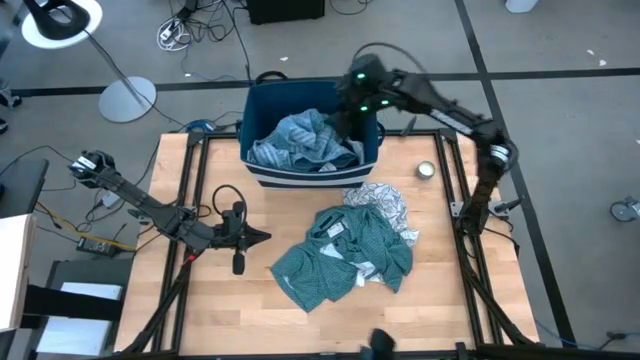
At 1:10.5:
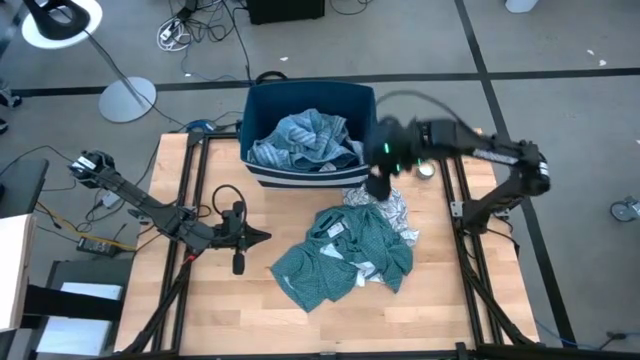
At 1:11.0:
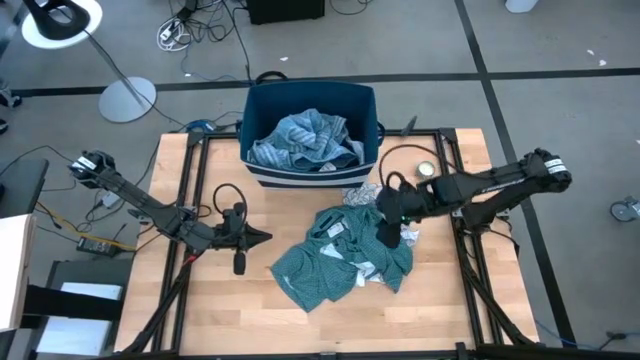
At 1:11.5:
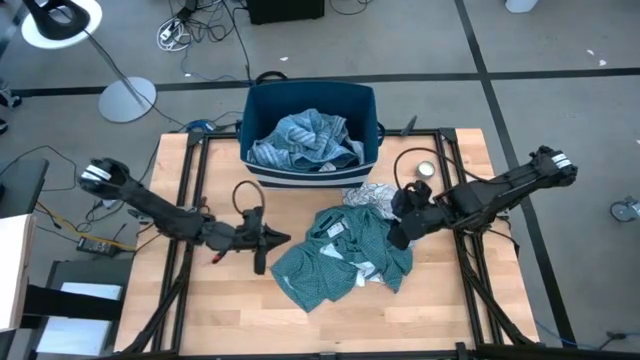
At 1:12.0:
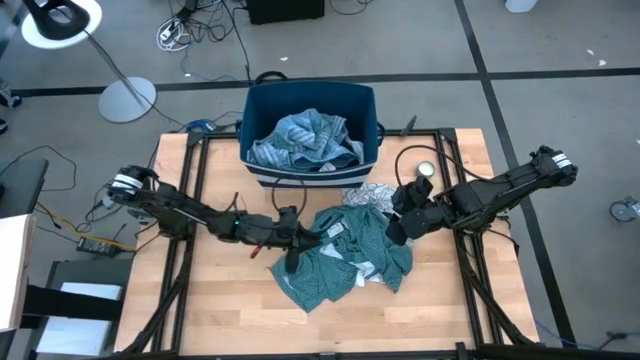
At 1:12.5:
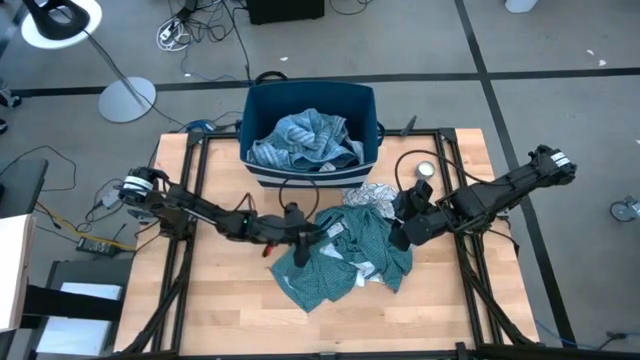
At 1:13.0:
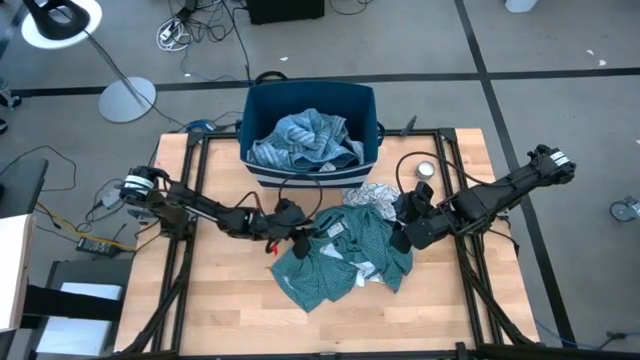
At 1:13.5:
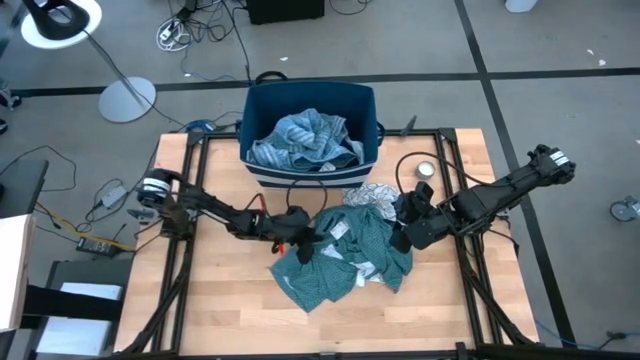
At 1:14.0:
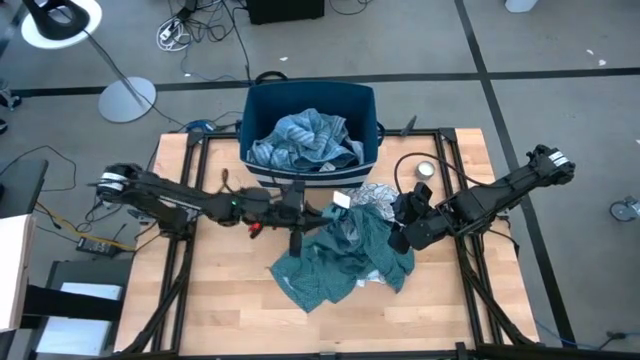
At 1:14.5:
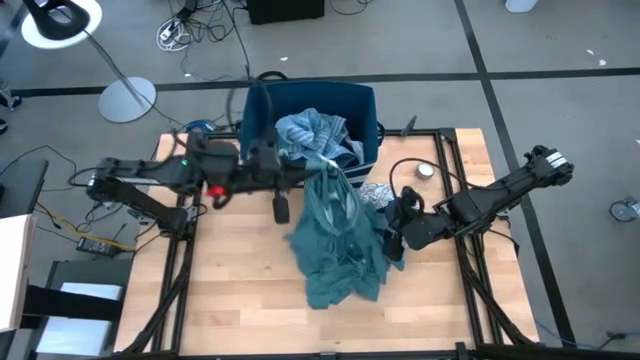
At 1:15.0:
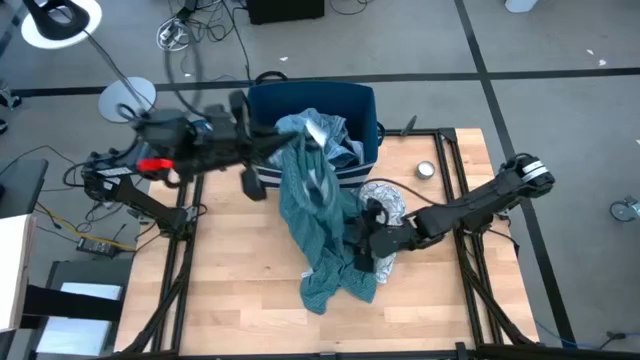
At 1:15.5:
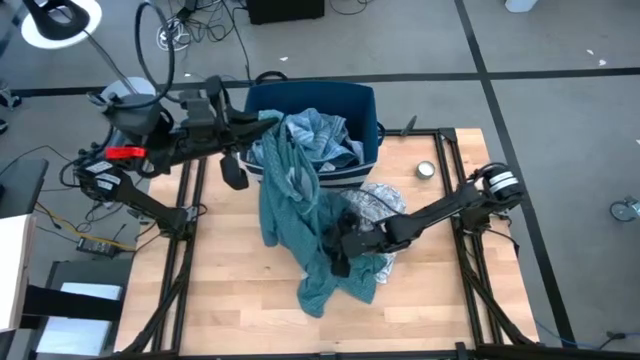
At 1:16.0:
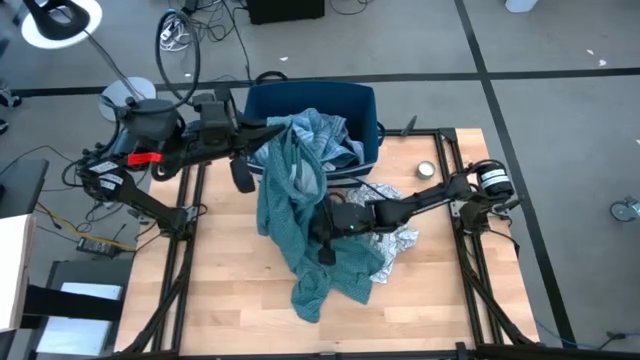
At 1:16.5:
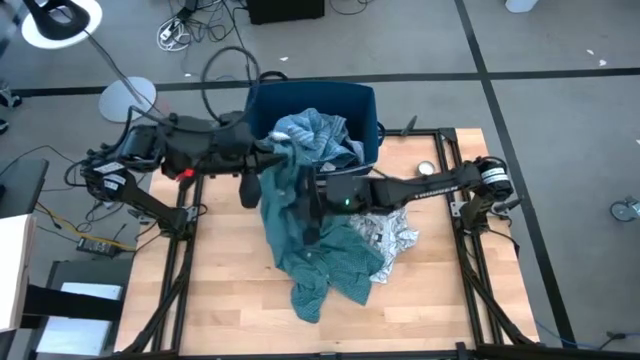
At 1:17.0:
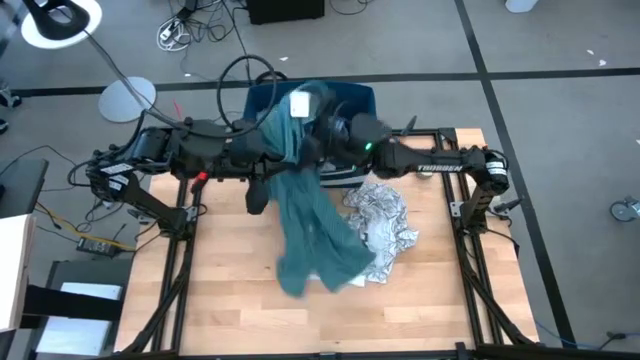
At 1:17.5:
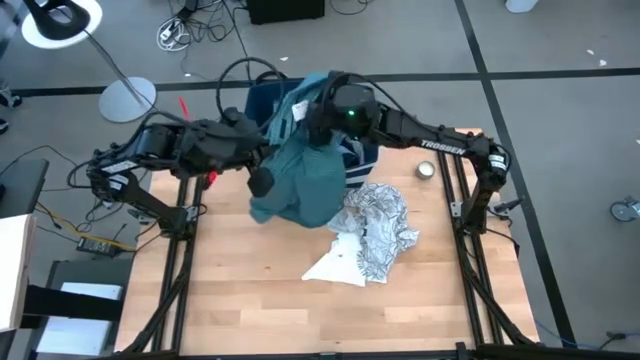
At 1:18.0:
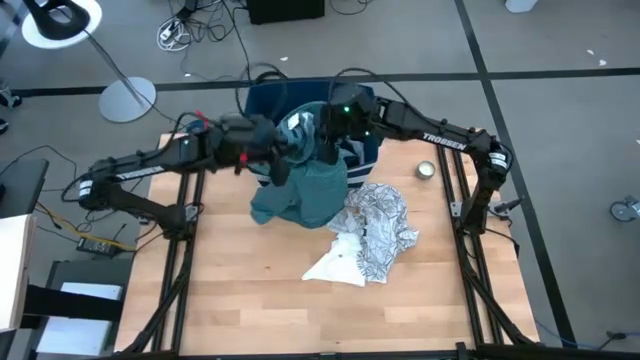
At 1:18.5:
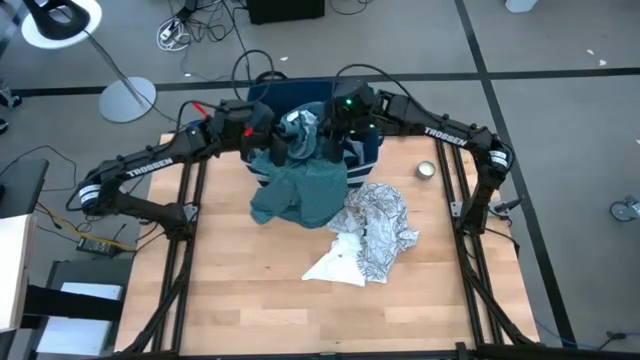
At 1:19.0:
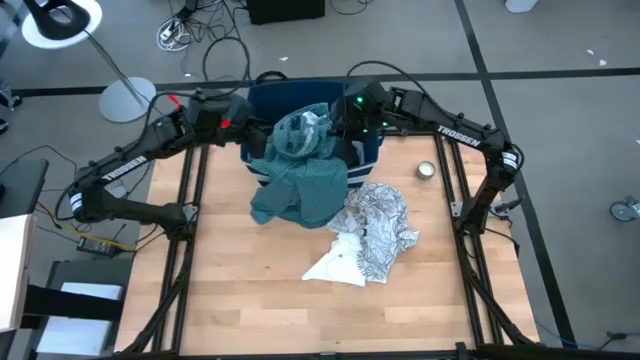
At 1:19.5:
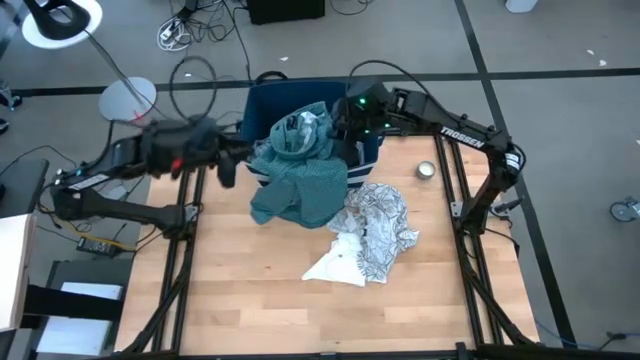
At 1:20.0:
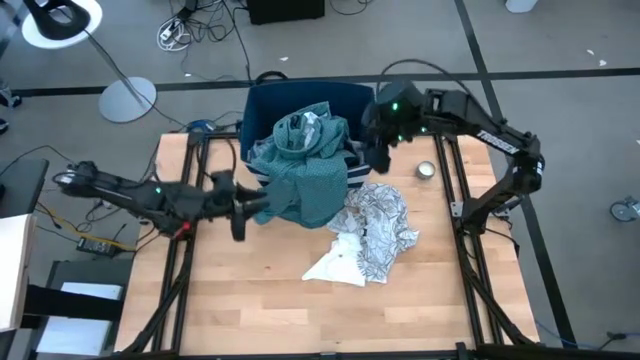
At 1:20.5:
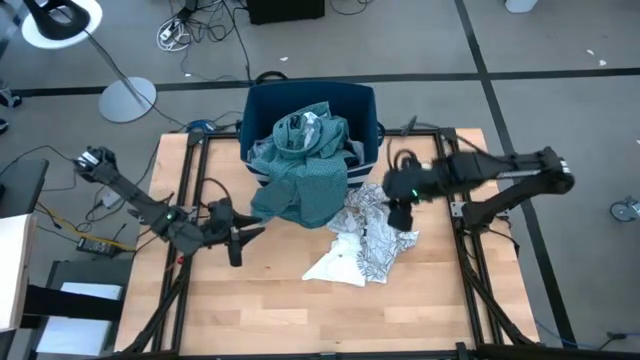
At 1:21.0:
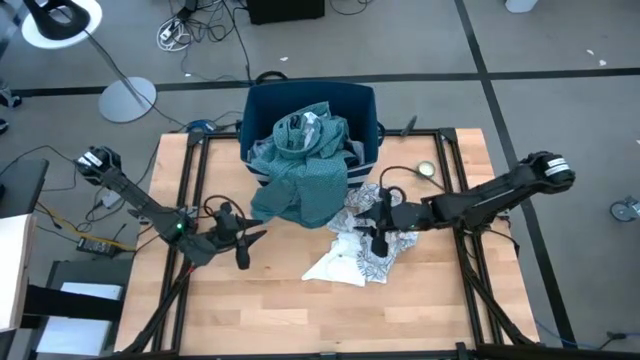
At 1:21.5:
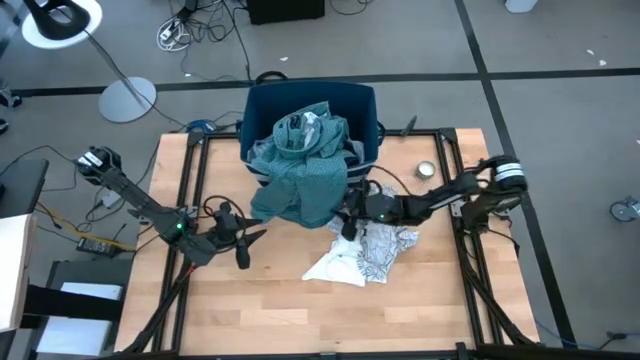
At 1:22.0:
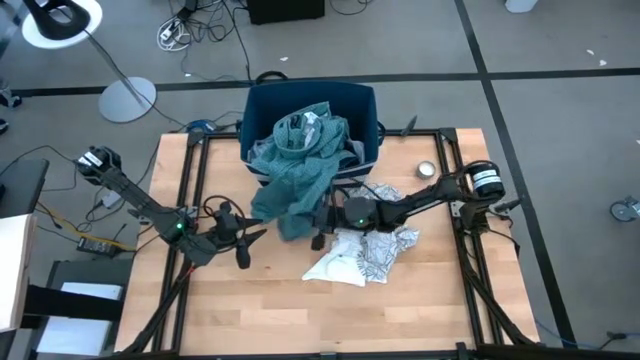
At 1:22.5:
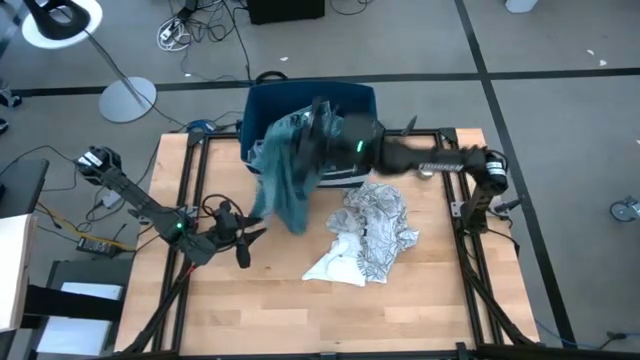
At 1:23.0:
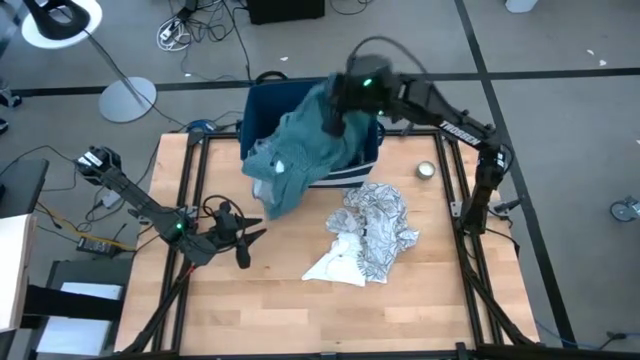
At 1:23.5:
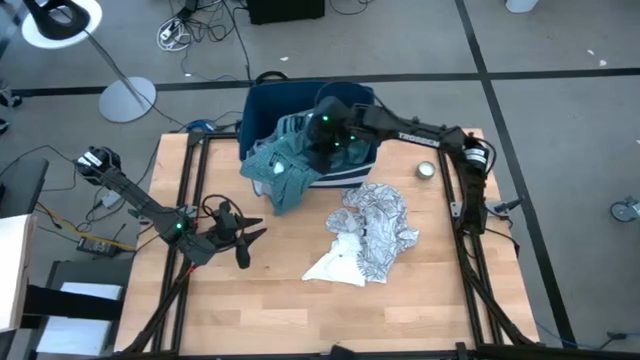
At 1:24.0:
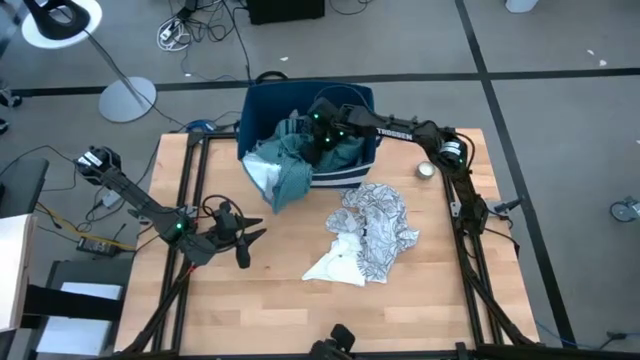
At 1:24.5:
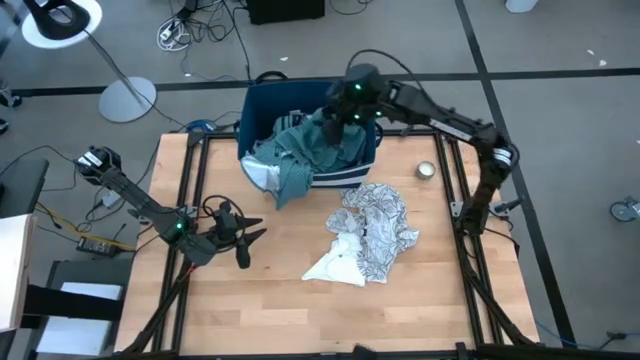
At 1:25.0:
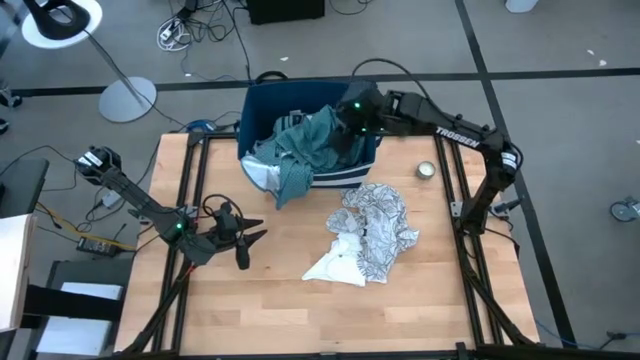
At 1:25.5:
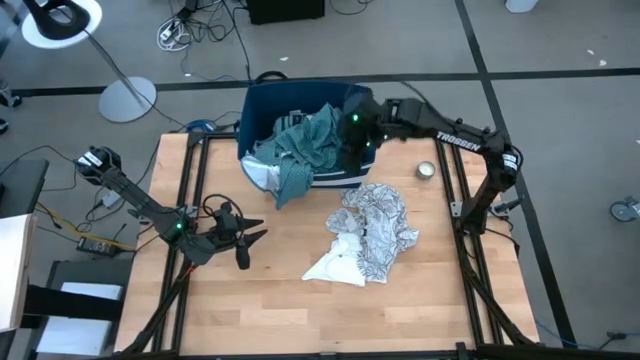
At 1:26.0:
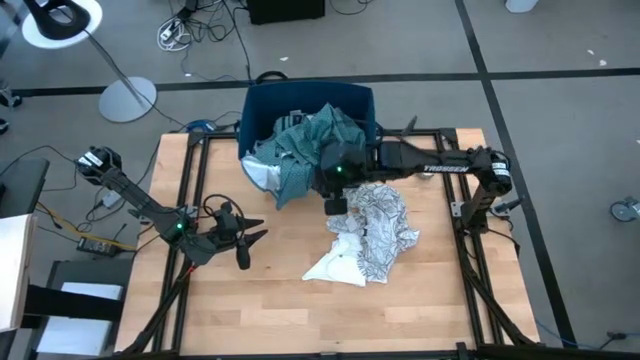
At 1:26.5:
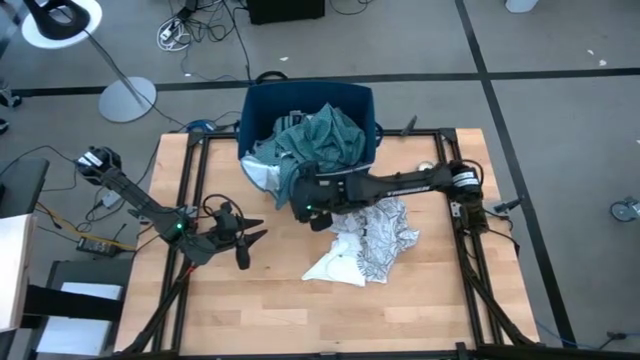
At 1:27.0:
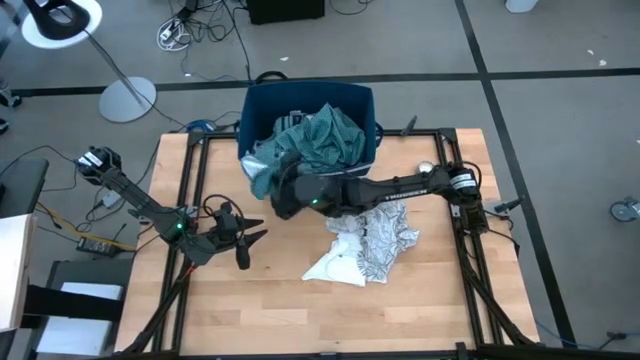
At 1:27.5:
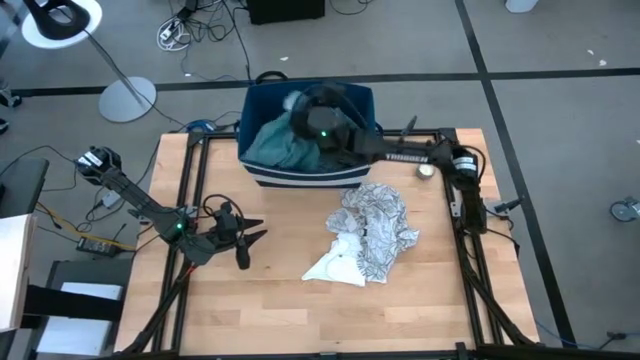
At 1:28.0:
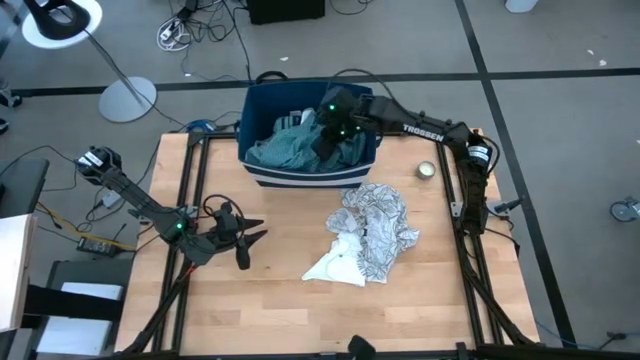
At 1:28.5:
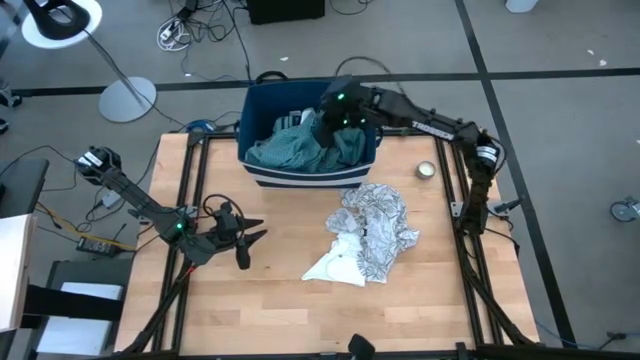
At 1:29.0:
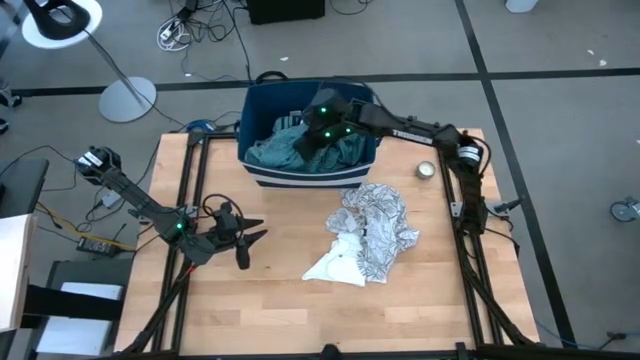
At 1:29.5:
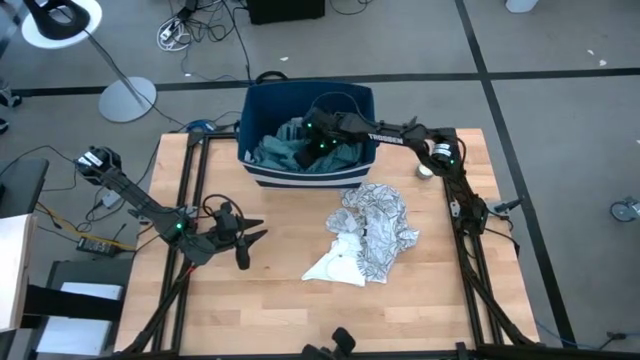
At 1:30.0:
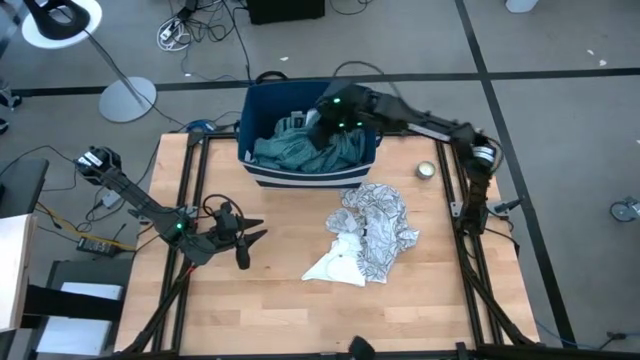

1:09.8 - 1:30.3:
Task: Sort clothes
Put the green polo shirt into the blue laundry organizer
